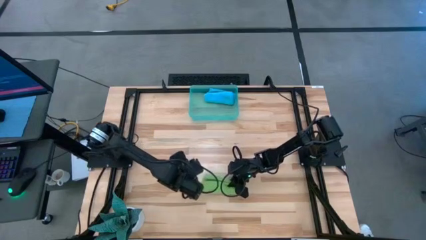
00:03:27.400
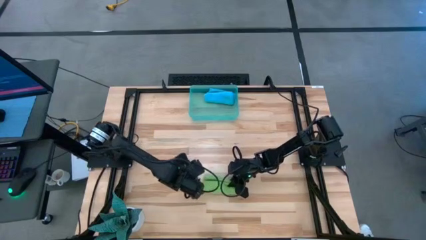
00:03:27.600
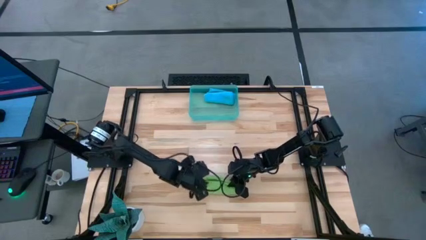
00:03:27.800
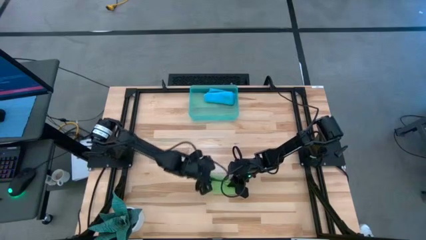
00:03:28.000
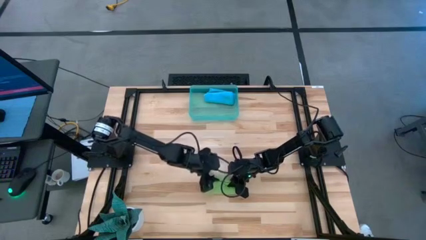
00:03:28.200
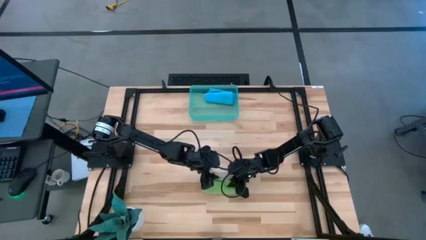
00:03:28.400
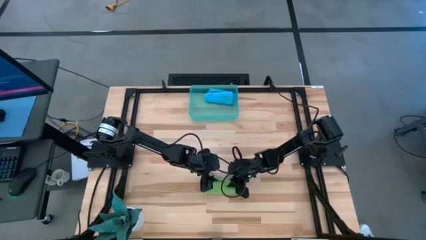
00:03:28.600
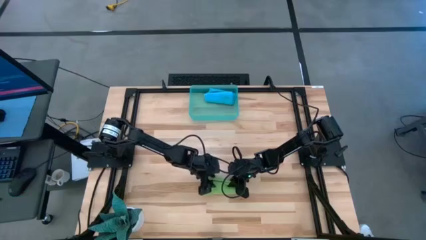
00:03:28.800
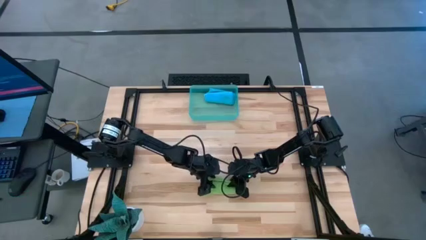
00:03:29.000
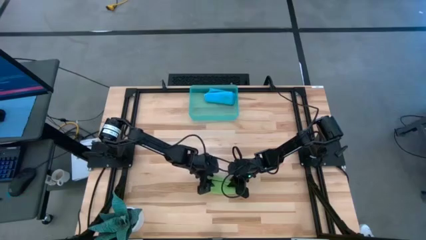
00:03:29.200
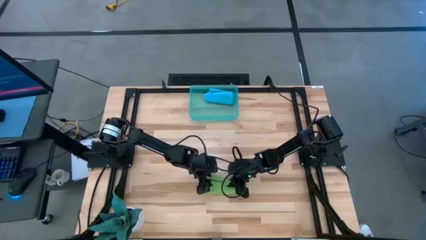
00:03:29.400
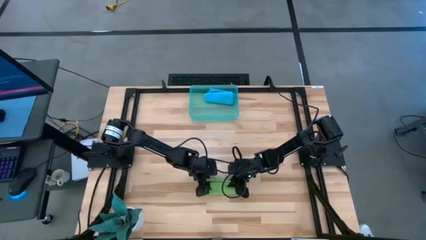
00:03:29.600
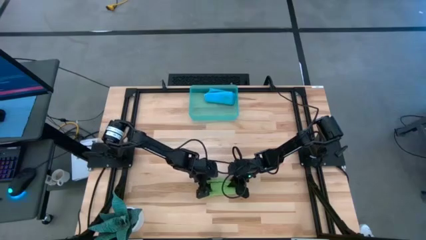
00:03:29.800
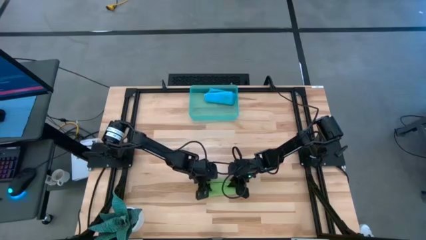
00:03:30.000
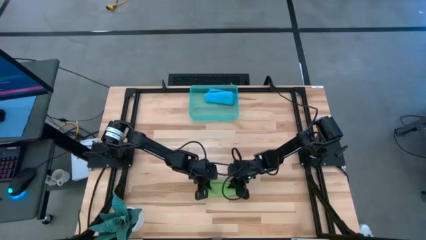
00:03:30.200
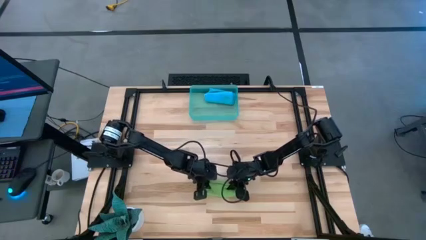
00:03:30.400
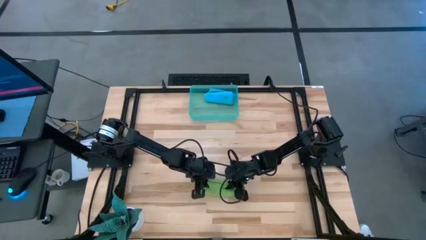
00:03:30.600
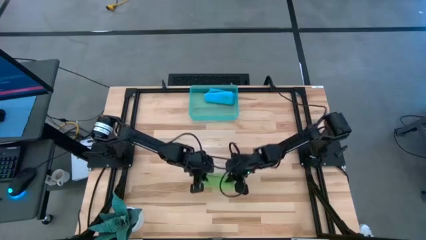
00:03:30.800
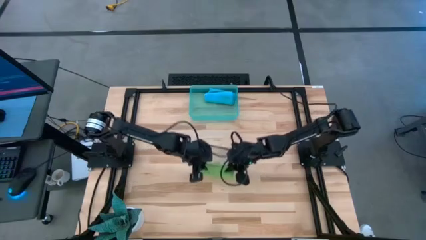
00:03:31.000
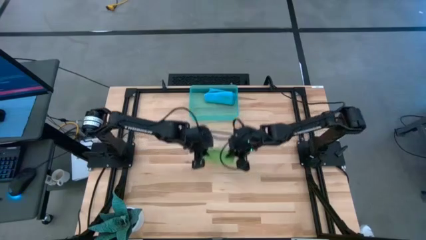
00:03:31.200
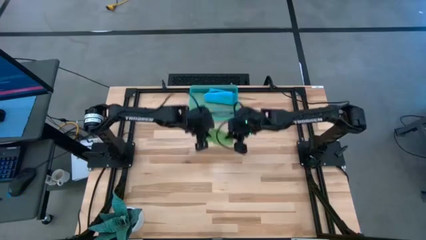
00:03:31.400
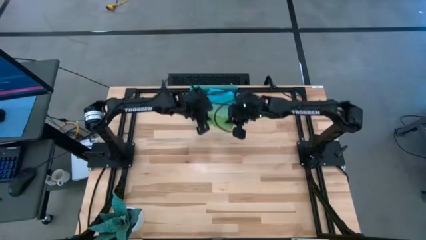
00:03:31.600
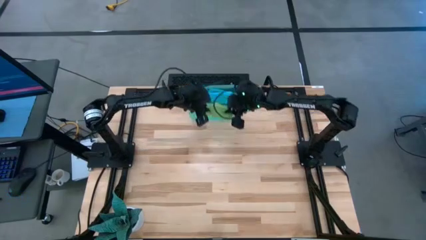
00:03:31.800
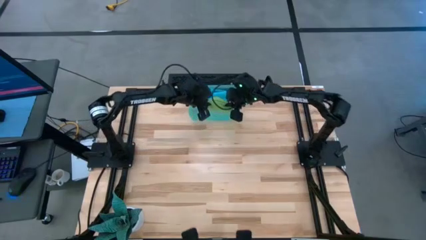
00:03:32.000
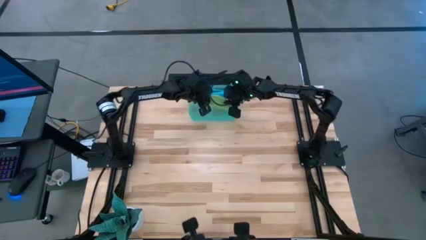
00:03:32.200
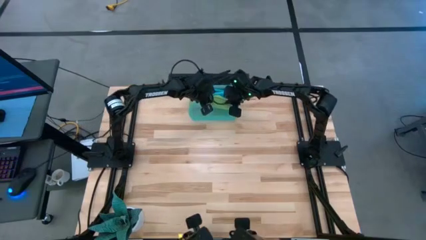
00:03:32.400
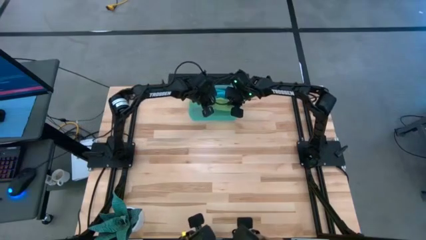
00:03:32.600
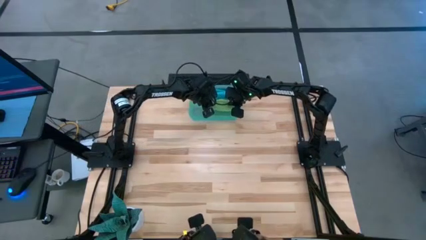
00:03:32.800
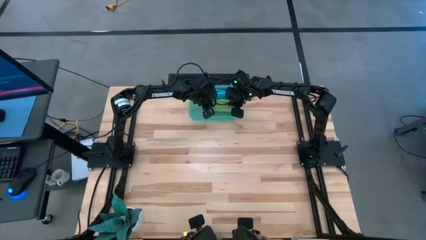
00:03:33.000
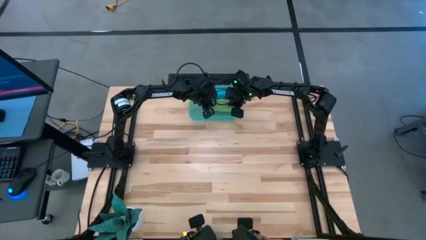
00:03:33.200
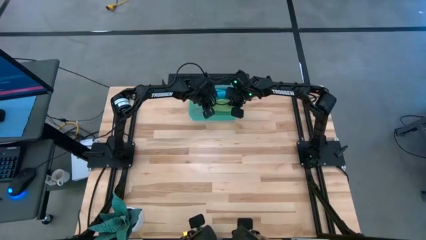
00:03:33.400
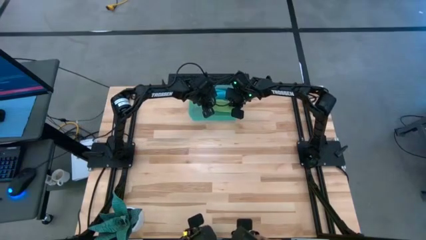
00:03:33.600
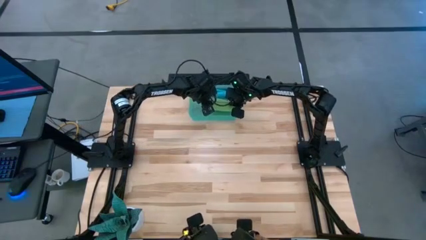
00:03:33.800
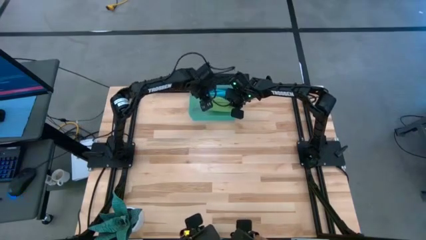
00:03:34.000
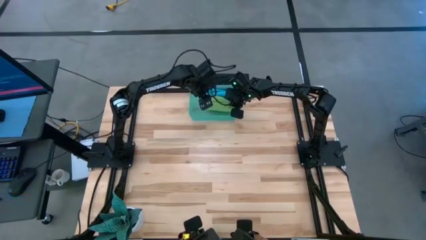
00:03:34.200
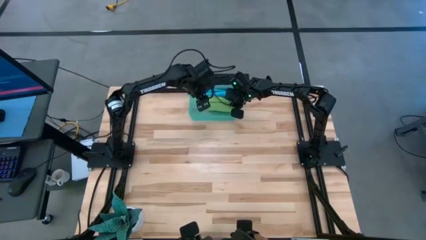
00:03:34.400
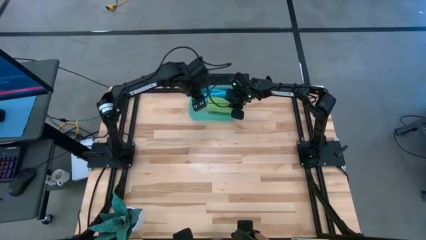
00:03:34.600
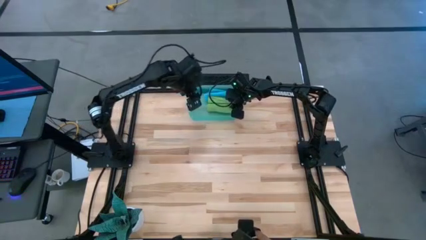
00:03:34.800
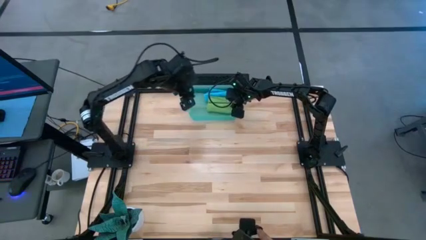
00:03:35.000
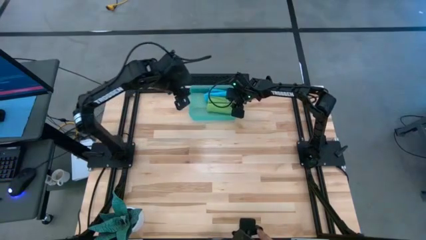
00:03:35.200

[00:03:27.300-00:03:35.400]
Task: Roll microfiber towels into tight, uniform cylinder then place into a basket
Put the green microfiber cloth into the blue bin

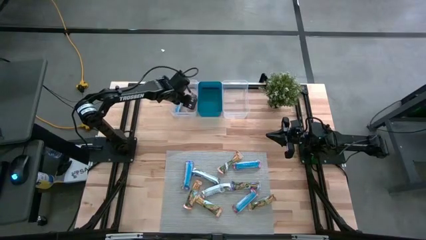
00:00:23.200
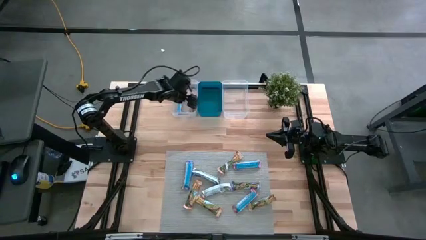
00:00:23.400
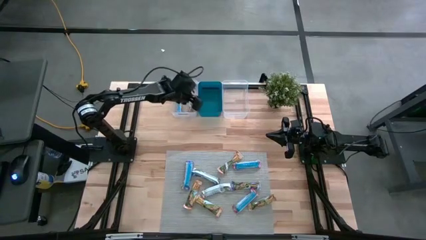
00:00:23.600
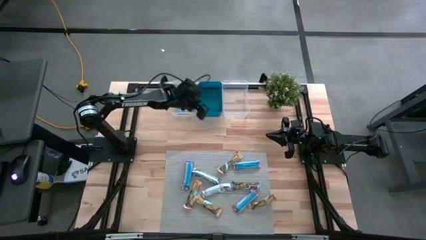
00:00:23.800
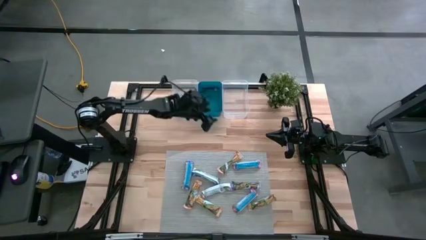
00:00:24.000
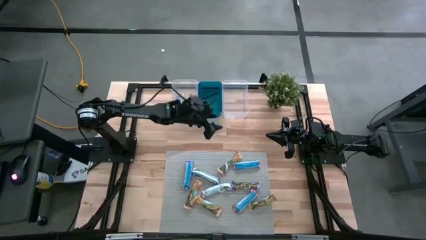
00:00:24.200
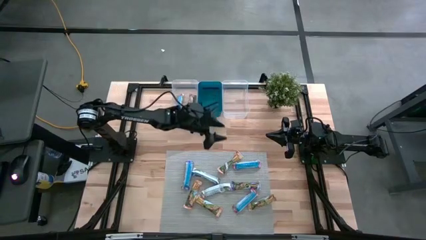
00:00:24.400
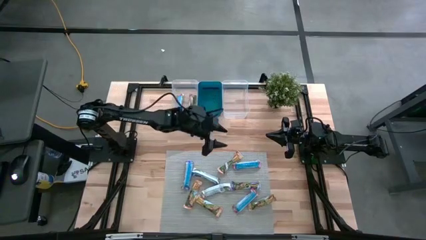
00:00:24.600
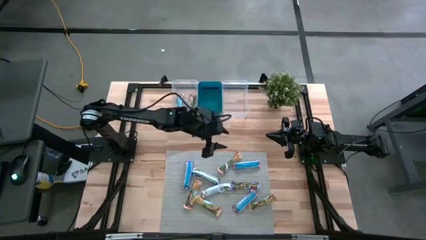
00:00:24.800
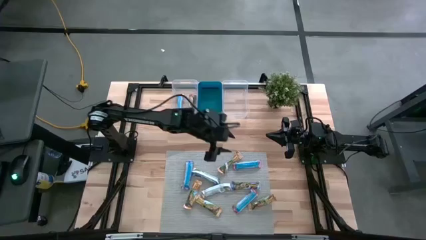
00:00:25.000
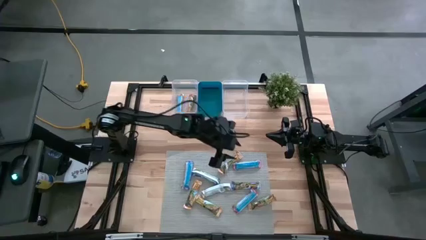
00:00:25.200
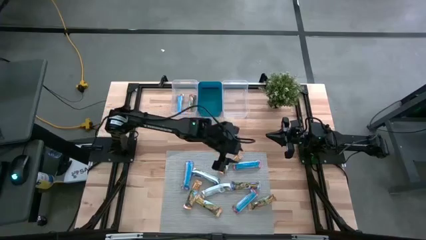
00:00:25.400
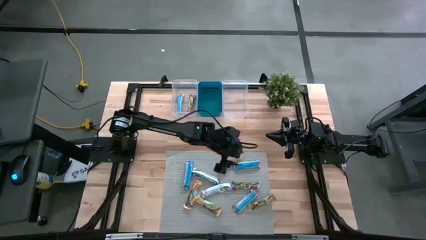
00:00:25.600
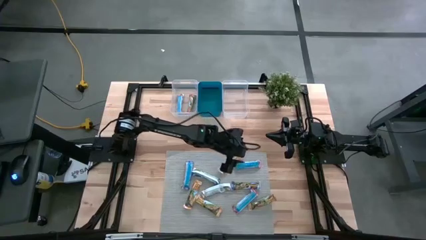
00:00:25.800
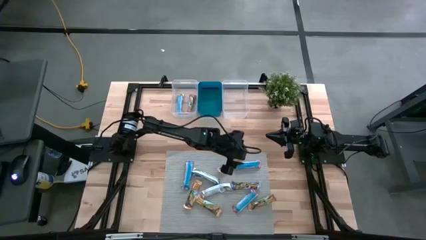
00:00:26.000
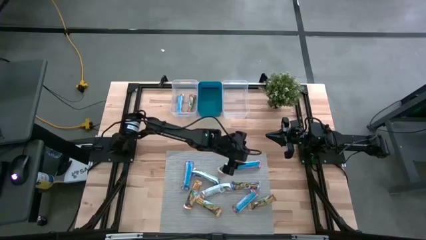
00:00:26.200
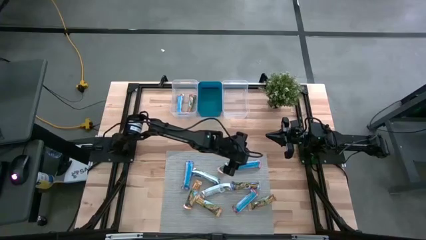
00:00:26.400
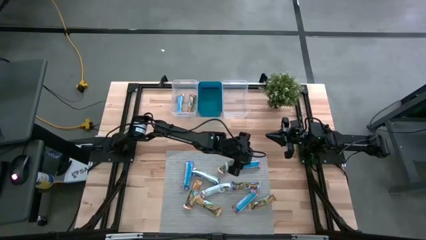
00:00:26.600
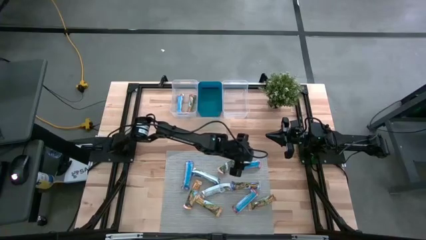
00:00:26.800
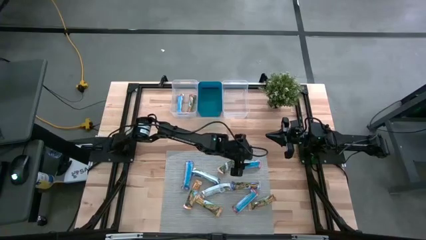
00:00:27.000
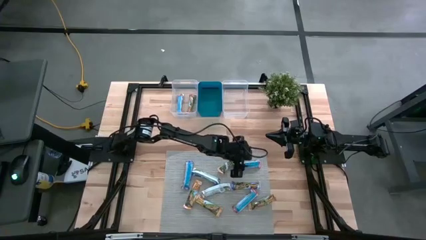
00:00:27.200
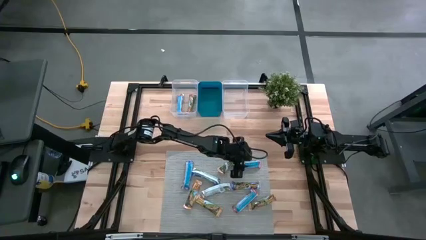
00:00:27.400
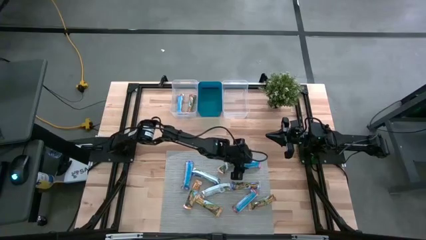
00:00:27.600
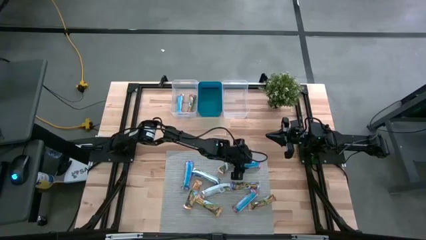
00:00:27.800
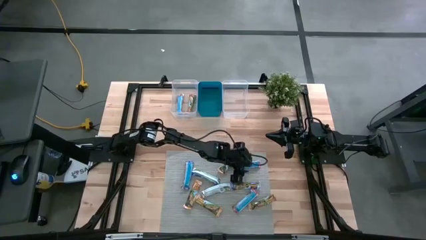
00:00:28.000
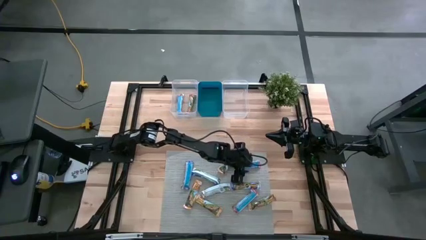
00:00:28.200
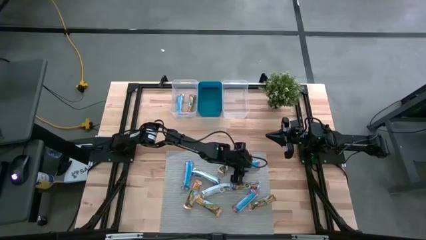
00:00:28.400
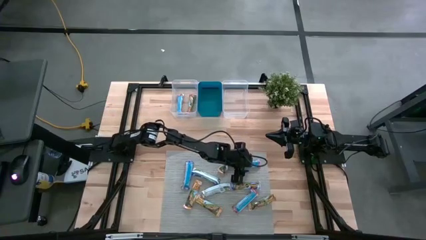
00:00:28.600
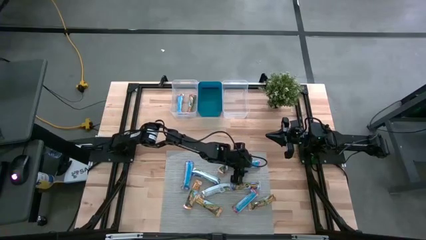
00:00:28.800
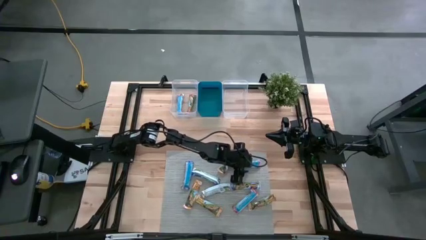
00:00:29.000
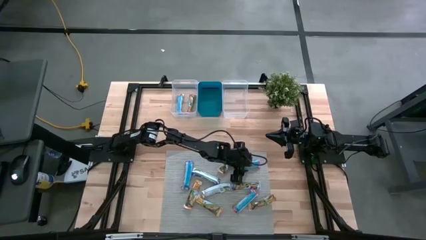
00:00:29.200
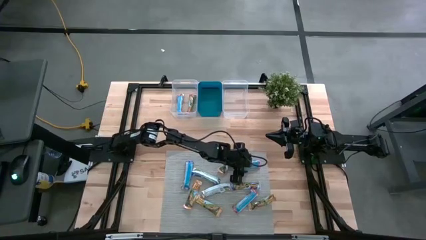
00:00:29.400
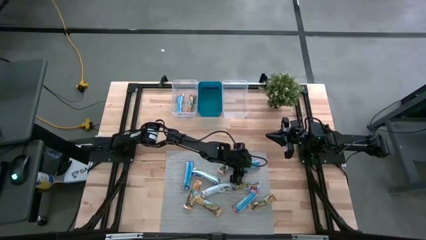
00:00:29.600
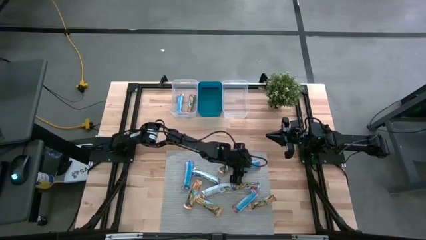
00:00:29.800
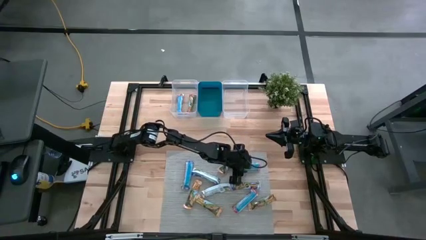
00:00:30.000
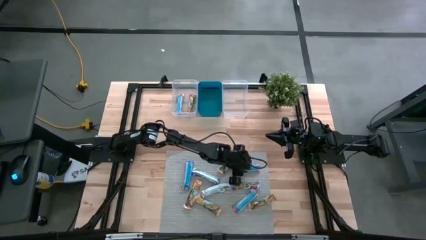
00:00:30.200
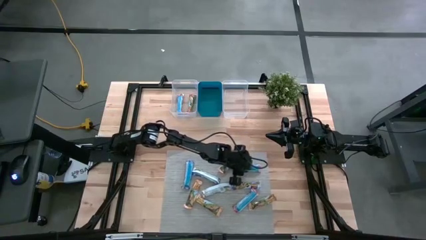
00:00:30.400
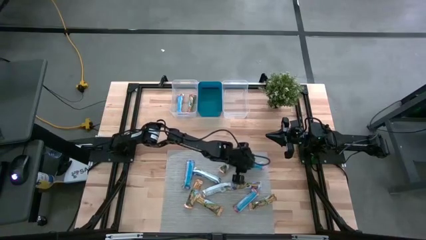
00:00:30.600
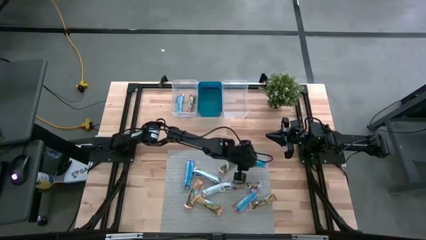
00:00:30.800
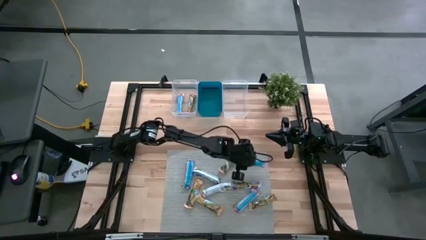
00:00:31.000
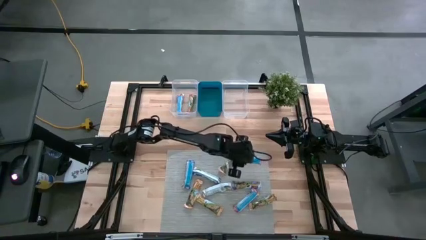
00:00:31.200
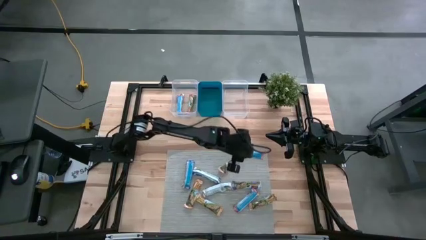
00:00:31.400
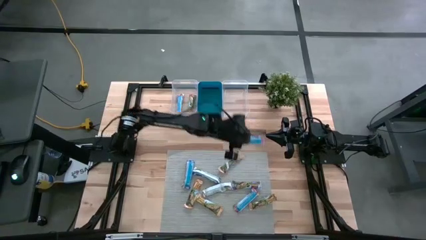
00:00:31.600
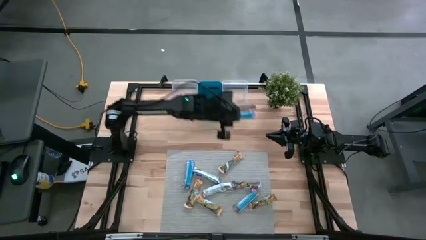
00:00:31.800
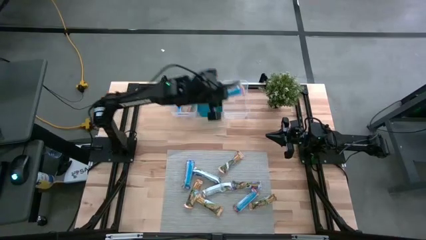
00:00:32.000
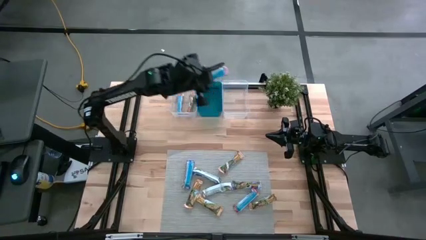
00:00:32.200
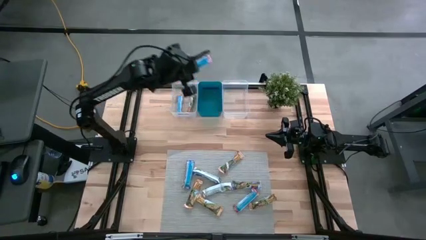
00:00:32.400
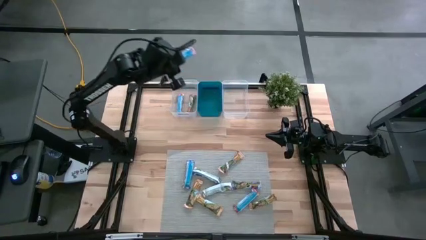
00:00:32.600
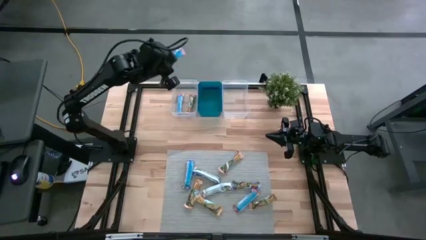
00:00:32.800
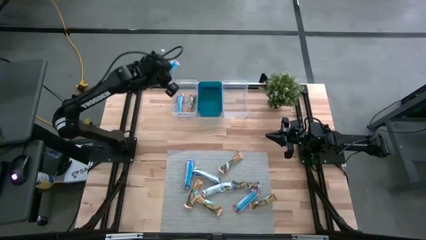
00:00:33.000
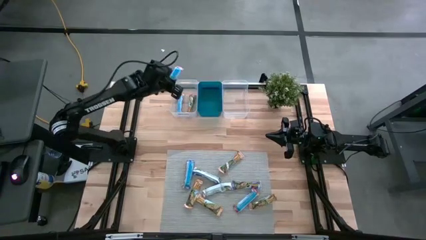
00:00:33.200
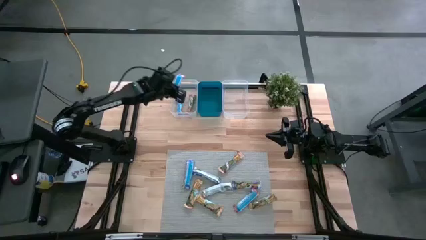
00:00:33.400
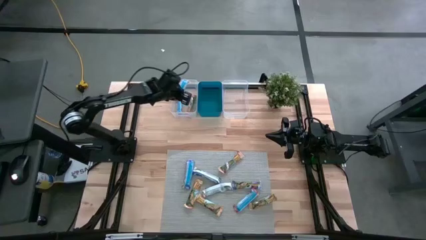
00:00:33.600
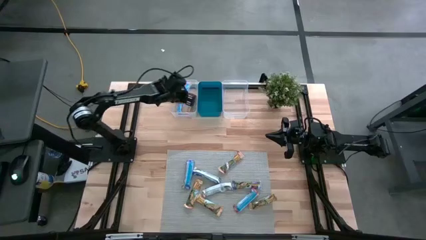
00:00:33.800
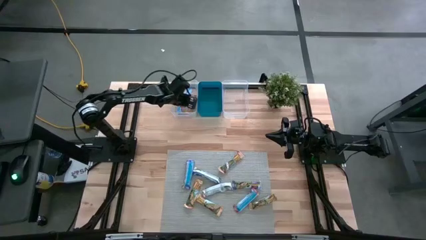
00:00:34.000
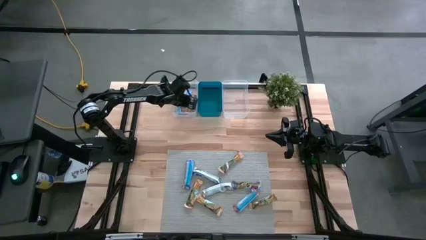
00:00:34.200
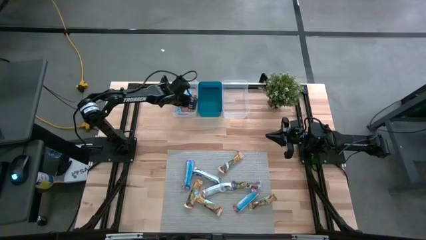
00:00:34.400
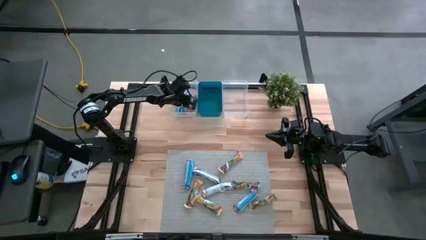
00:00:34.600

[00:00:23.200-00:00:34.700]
Task: Pick and place Granola Bars by type
Put the red granola bar into the left transparent bin
